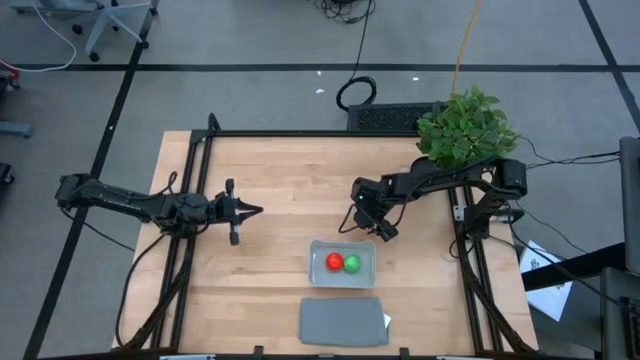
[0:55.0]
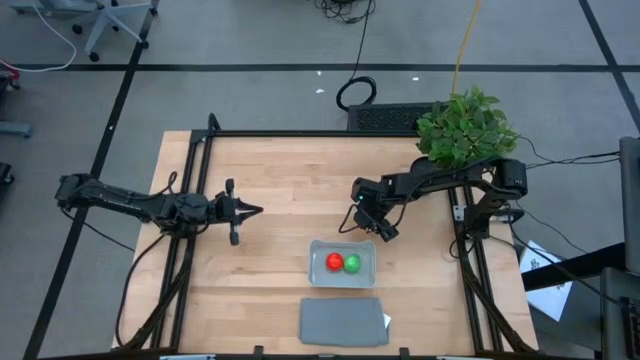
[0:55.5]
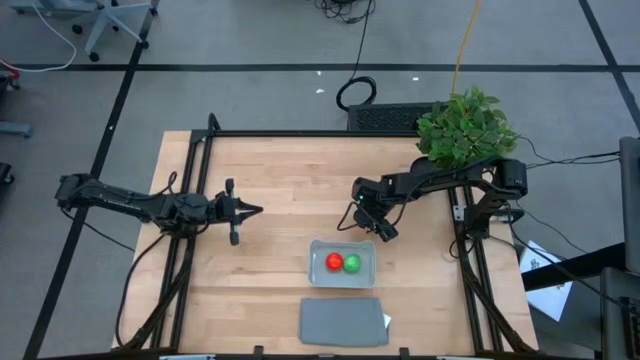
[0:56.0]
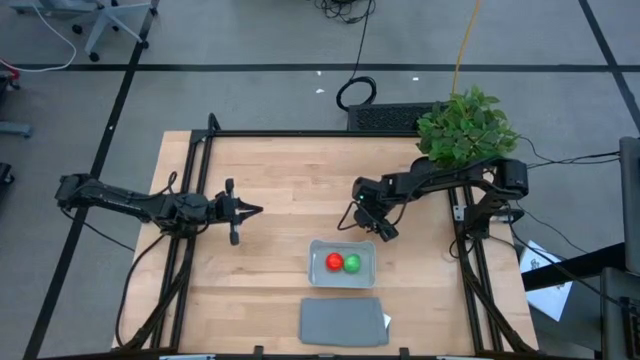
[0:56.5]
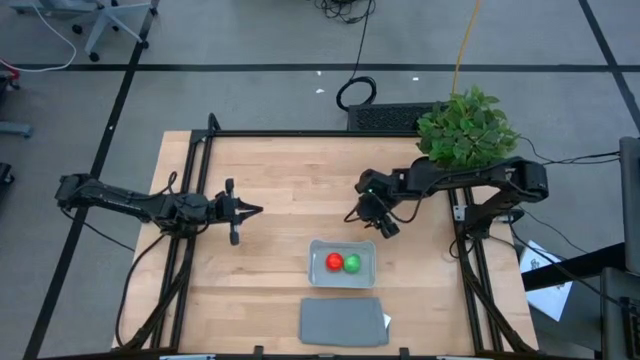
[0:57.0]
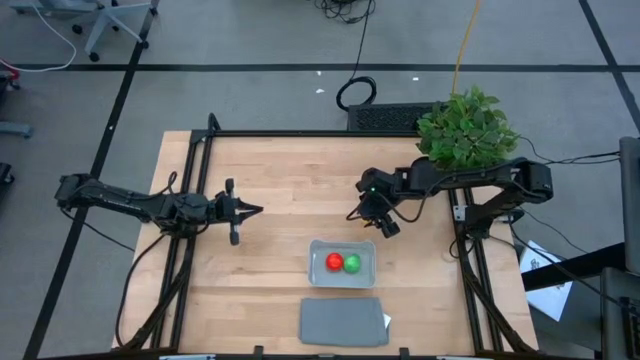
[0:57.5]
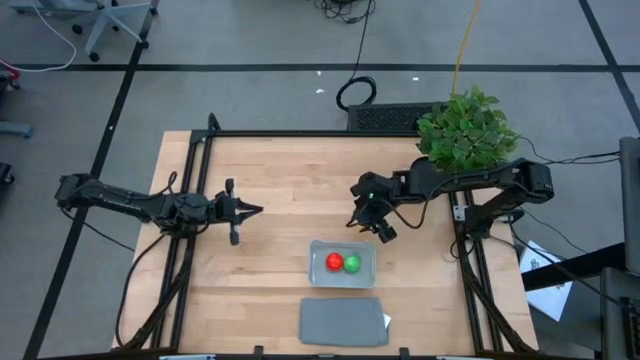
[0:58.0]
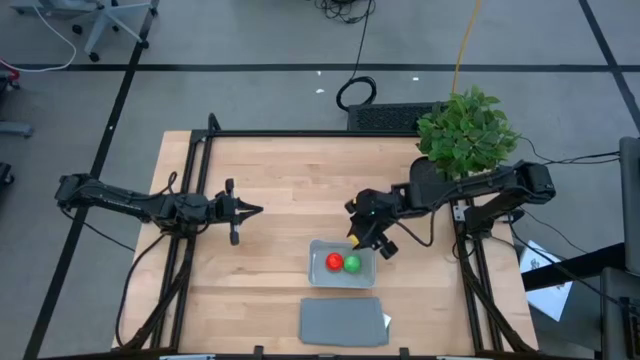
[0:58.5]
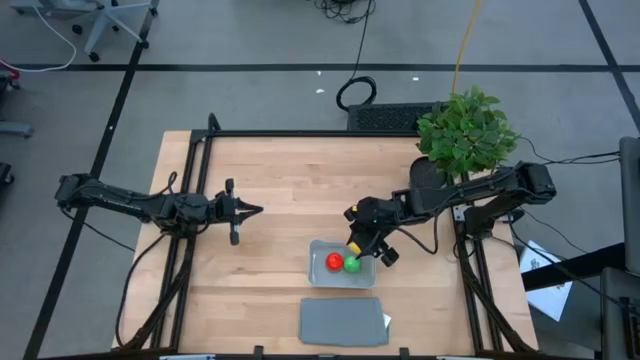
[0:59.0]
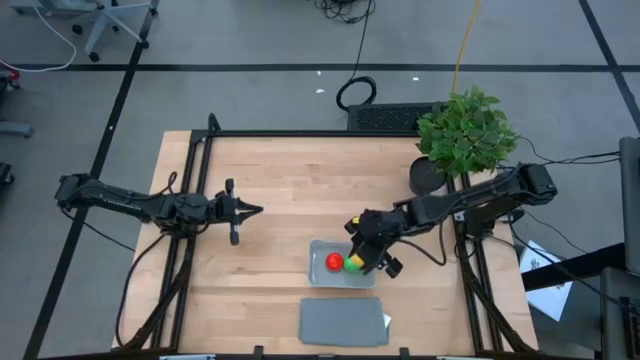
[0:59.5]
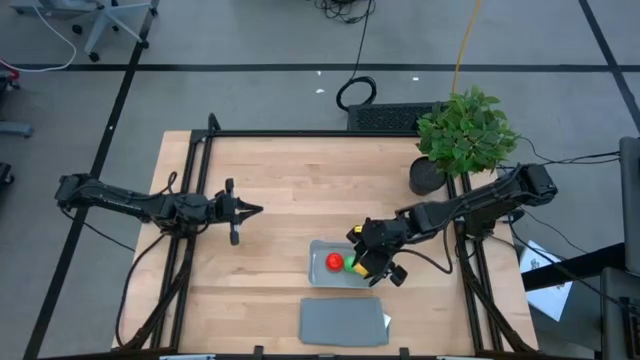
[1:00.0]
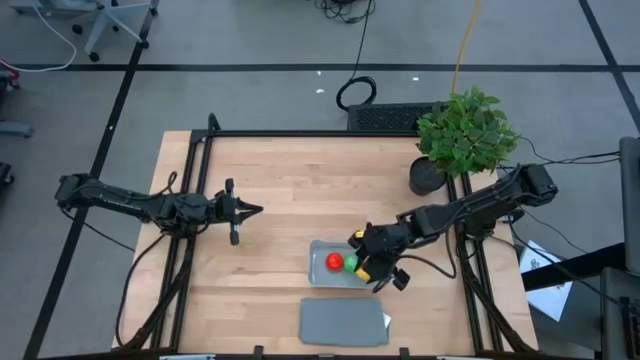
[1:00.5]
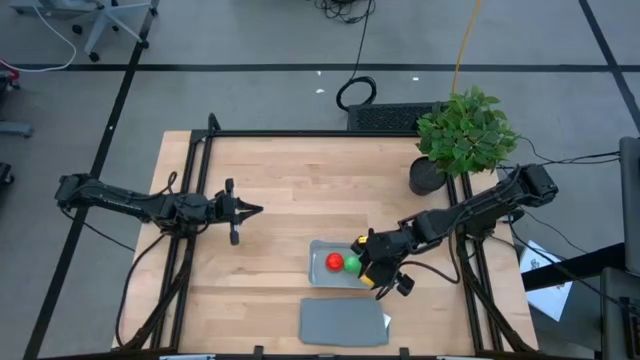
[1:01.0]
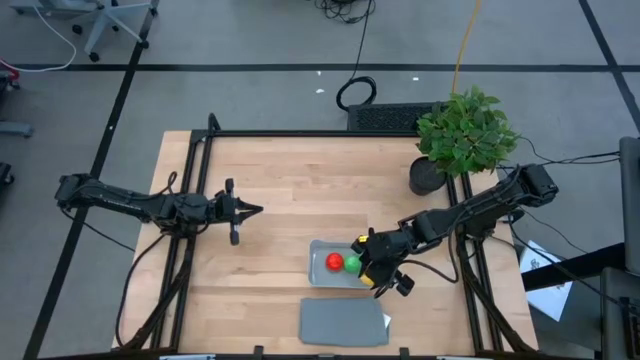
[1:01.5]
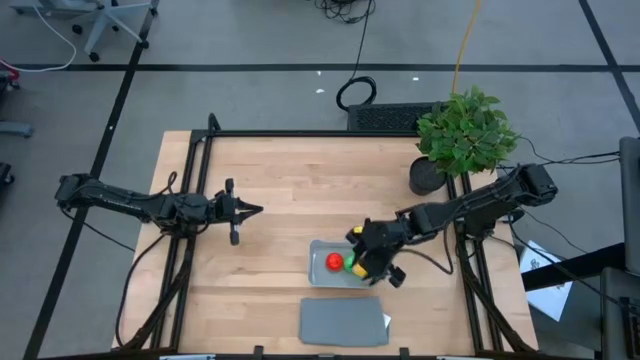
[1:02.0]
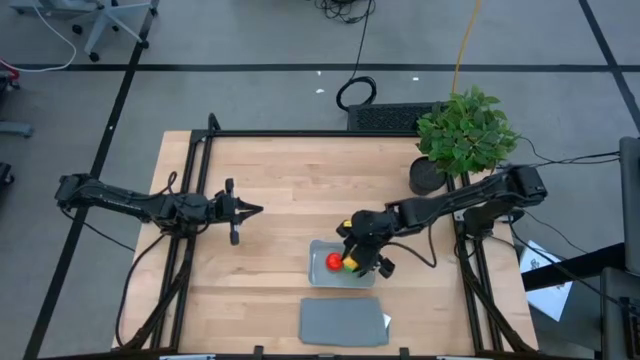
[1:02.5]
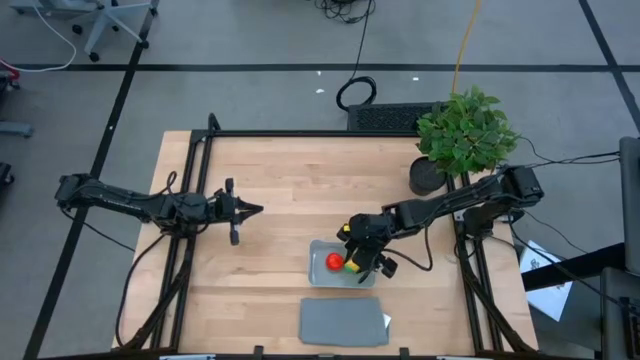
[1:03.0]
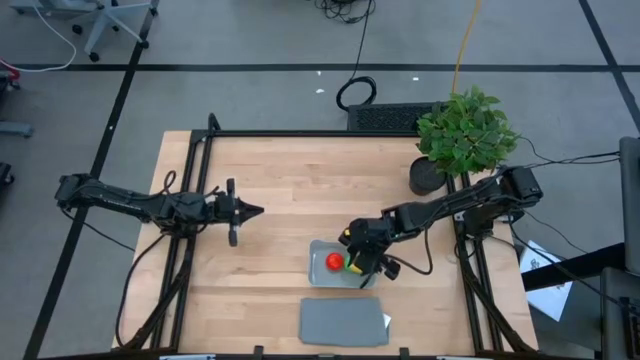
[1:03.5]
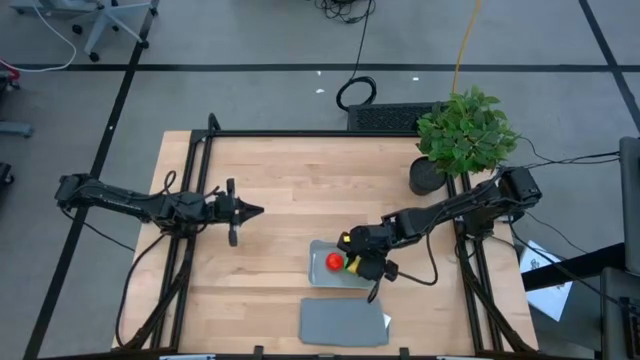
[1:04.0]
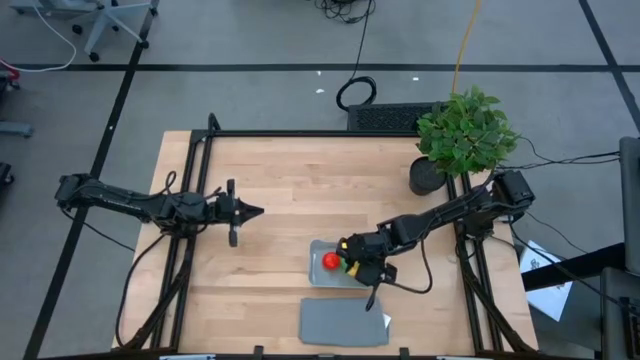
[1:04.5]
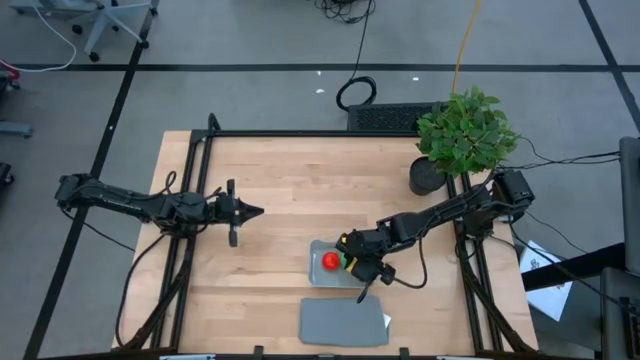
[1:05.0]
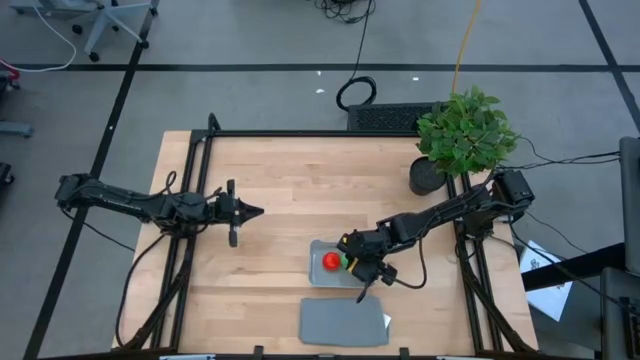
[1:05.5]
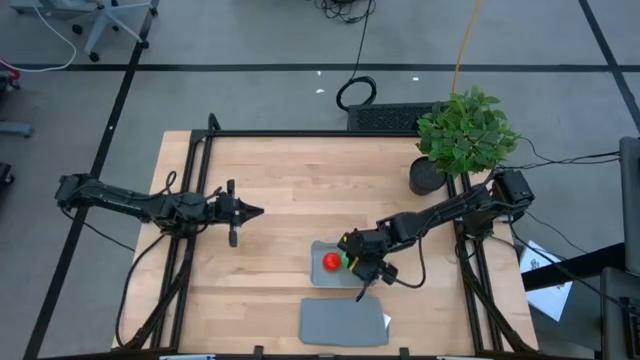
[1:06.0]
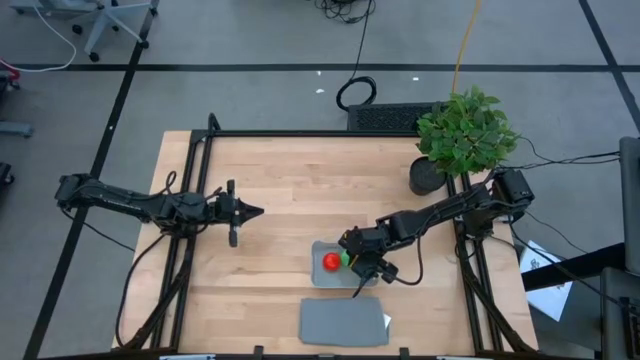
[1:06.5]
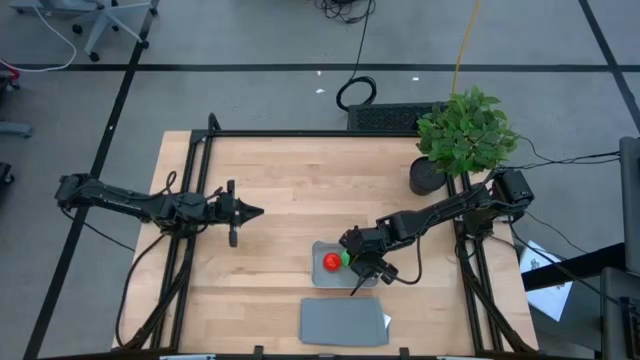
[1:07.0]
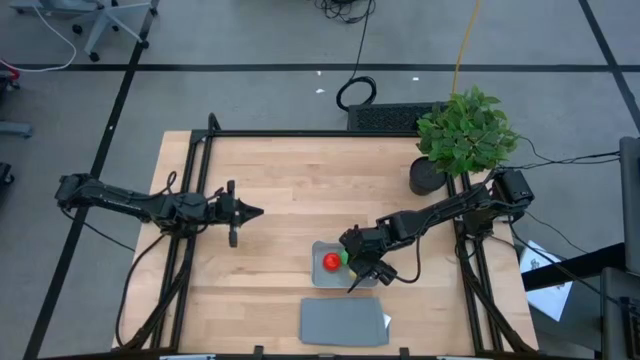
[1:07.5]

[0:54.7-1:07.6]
Task: Pick and placing Produce into tupperware
Put the yellow pineapple into the gray bin

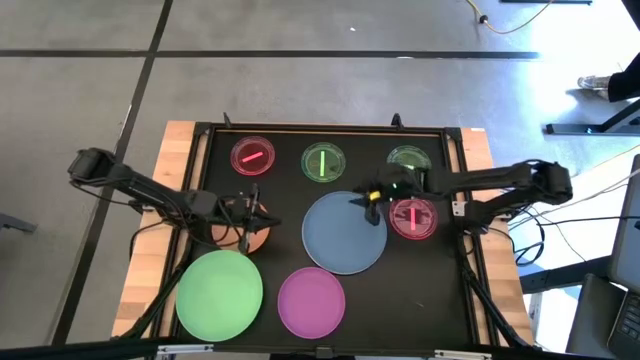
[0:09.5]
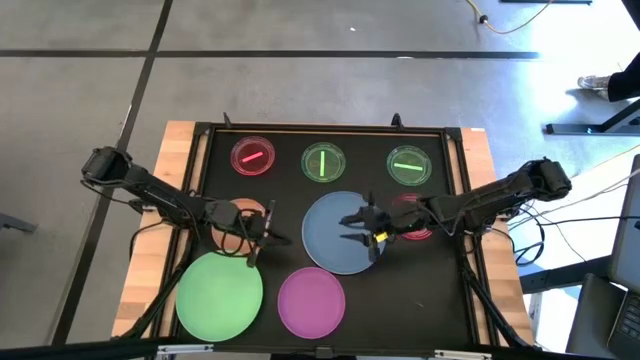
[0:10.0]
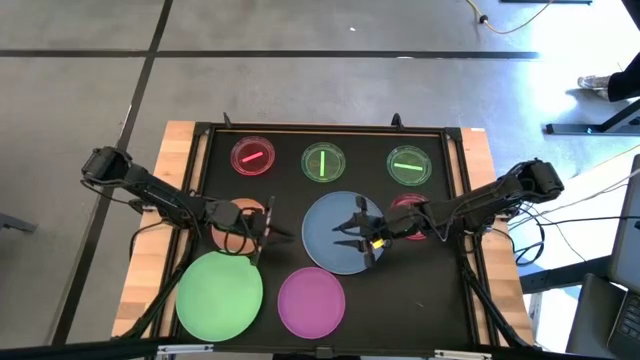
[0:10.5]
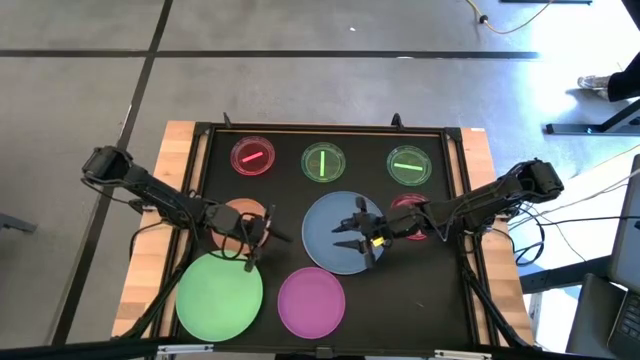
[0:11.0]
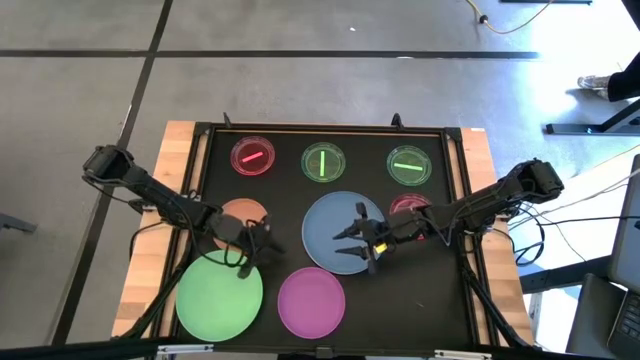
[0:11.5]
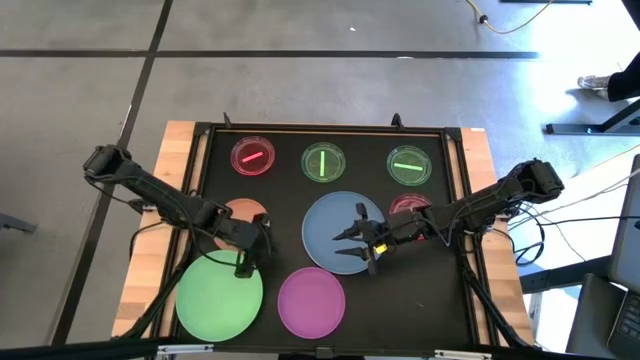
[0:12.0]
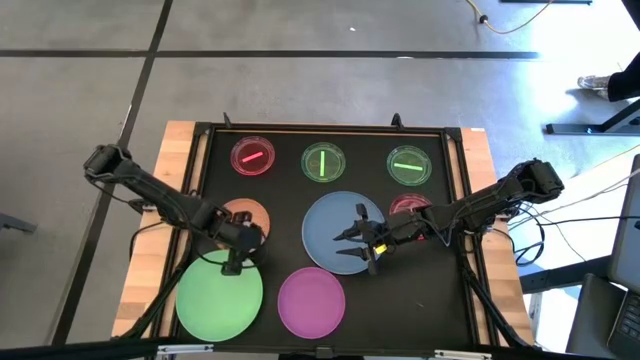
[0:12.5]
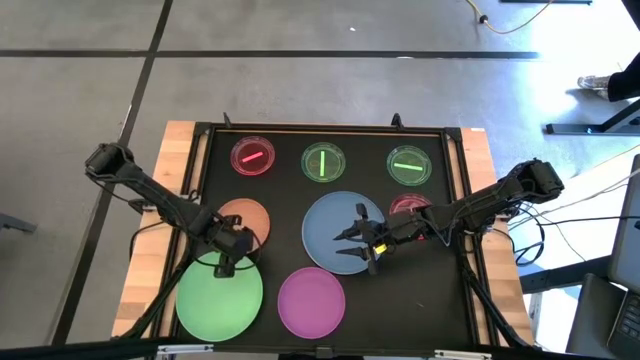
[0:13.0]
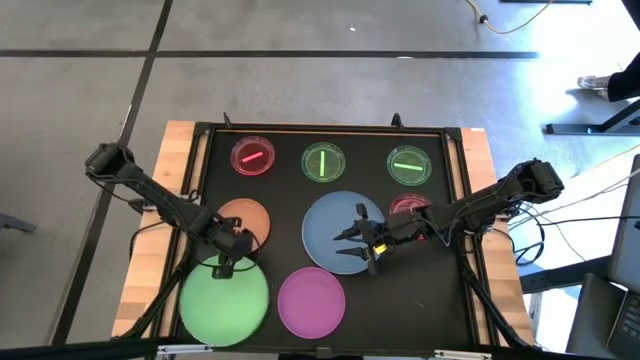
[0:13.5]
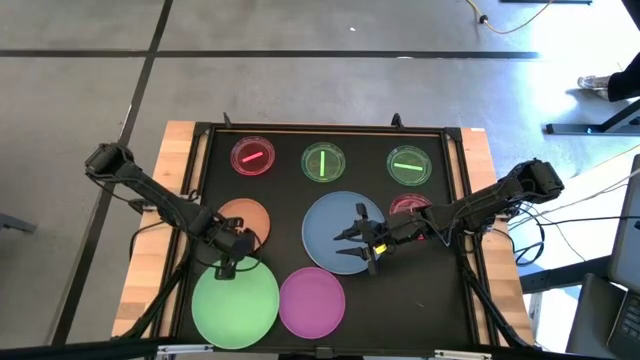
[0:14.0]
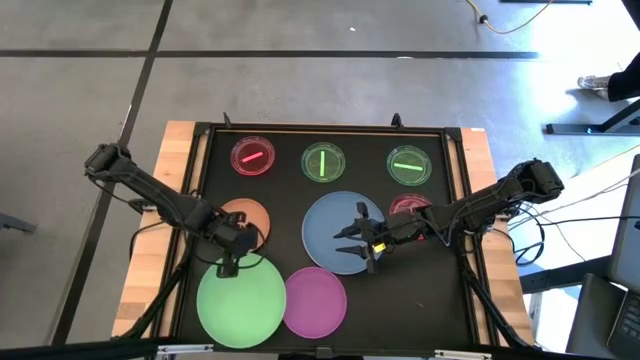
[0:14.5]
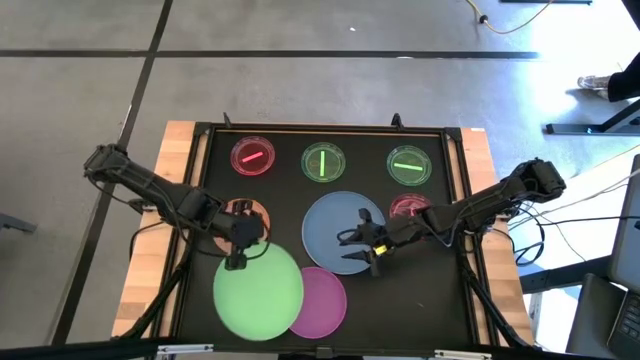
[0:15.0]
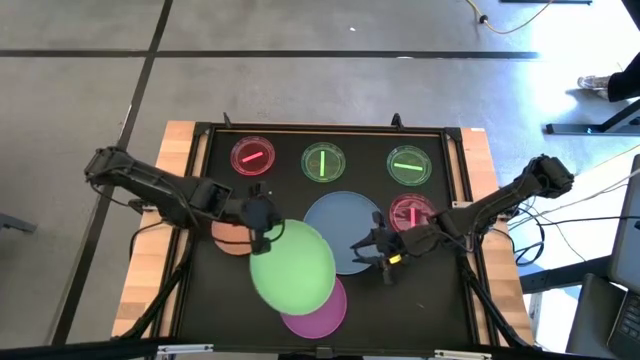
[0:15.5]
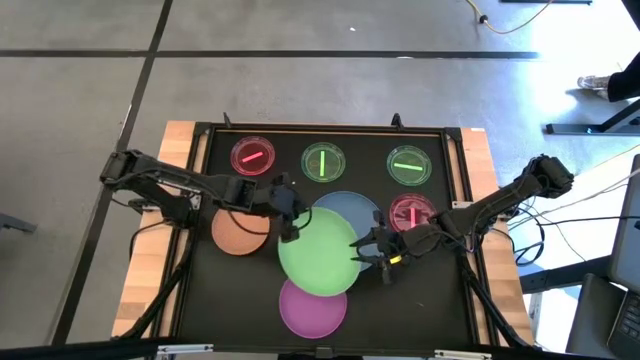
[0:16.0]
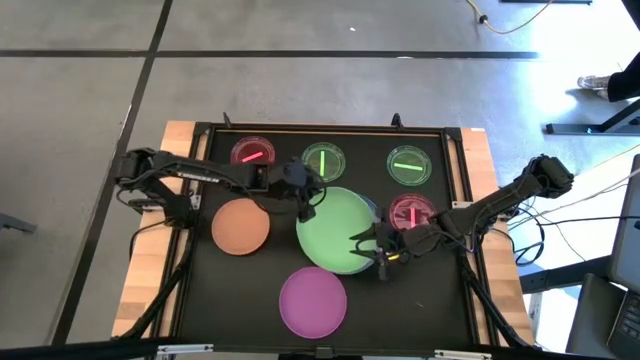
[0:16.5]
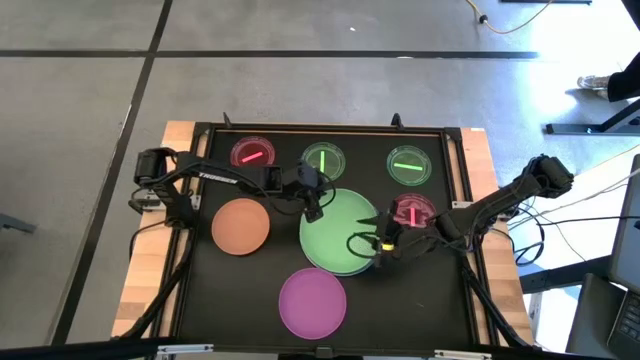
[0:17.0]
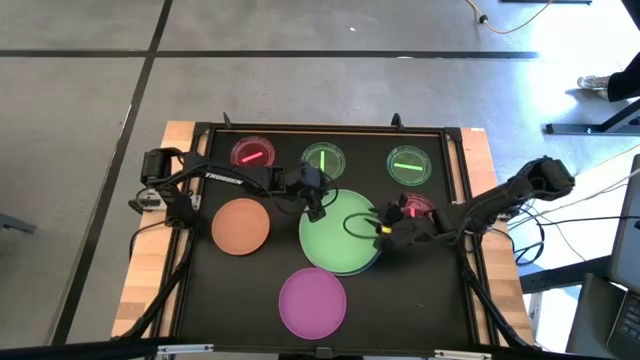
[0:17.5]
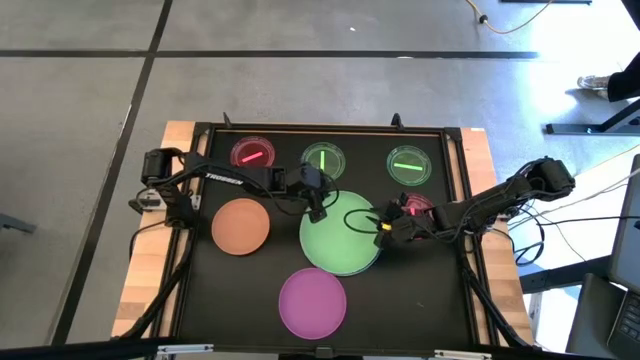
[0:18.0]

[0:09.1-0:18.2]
Task: Stack plastic plates
Stack the green plate on the blue plate
